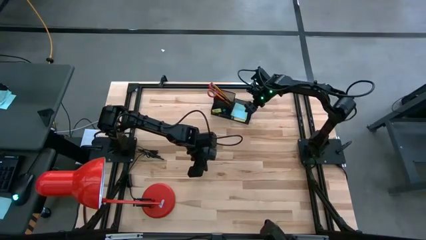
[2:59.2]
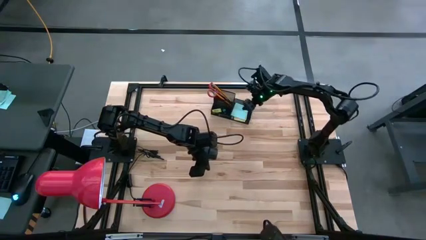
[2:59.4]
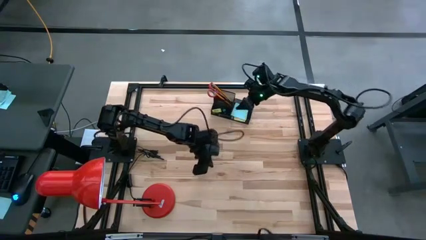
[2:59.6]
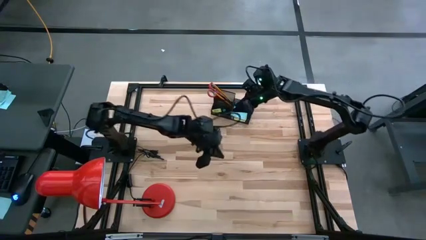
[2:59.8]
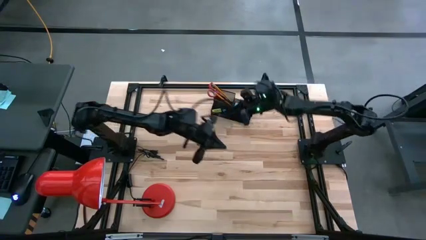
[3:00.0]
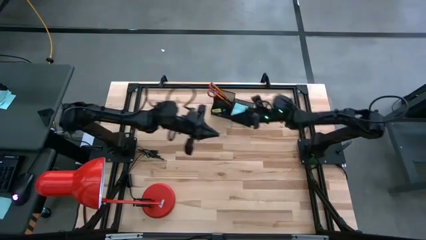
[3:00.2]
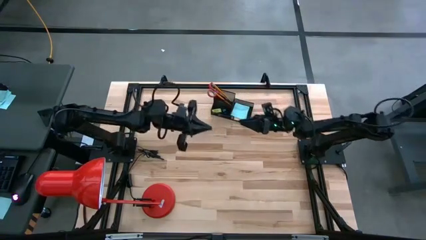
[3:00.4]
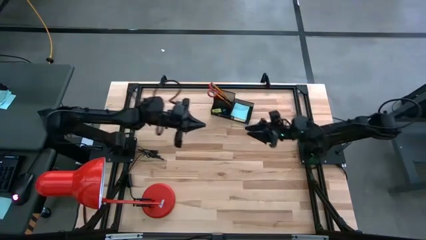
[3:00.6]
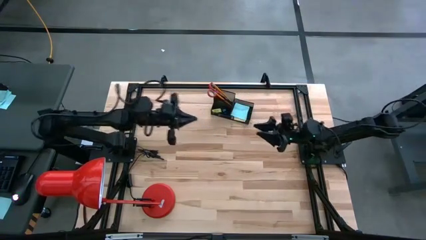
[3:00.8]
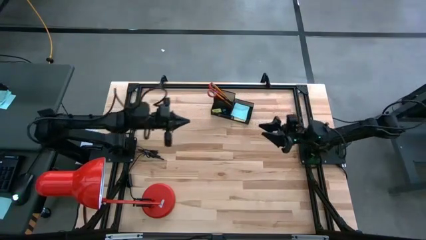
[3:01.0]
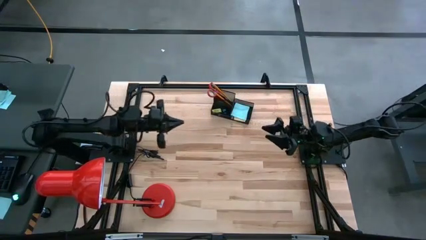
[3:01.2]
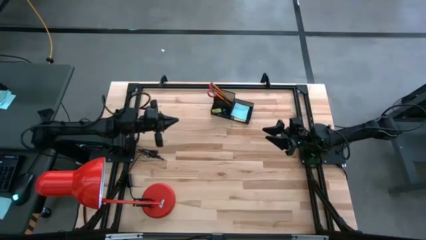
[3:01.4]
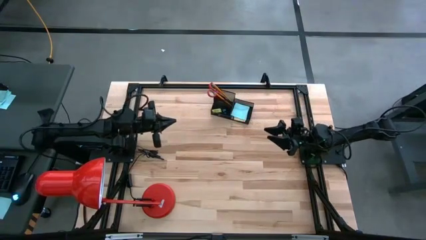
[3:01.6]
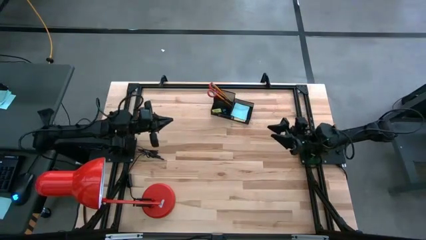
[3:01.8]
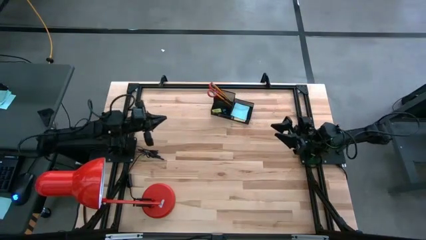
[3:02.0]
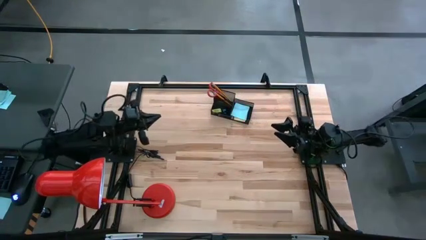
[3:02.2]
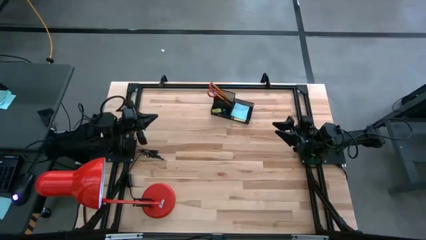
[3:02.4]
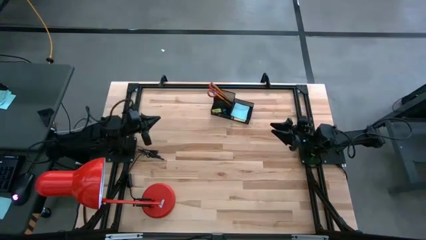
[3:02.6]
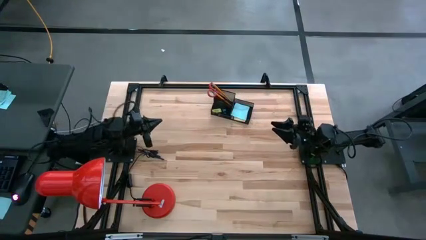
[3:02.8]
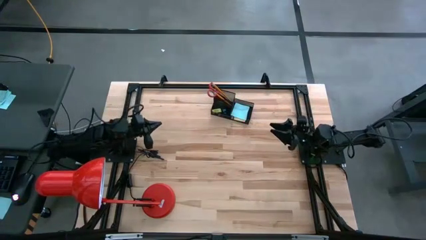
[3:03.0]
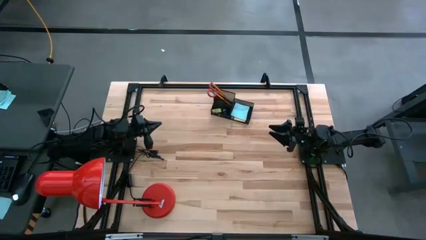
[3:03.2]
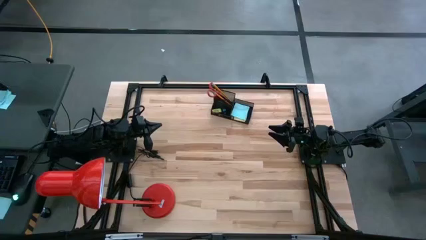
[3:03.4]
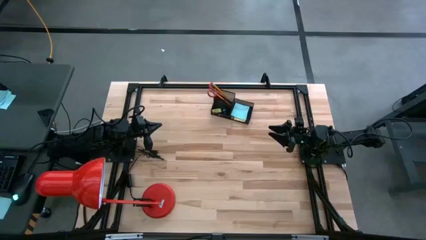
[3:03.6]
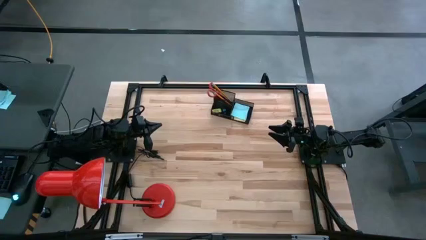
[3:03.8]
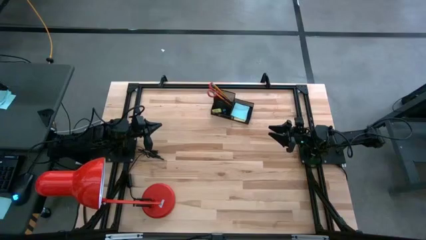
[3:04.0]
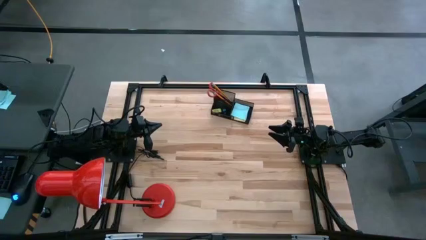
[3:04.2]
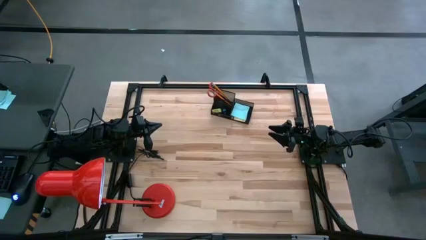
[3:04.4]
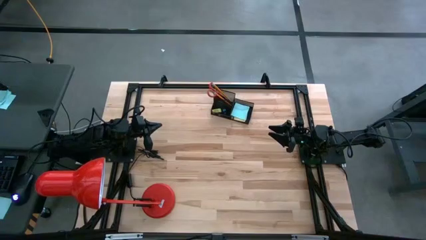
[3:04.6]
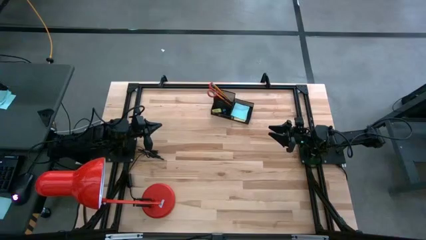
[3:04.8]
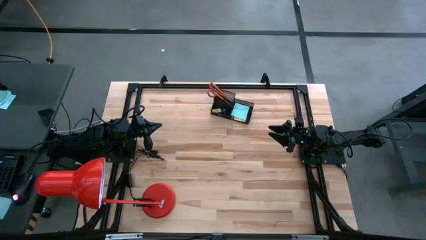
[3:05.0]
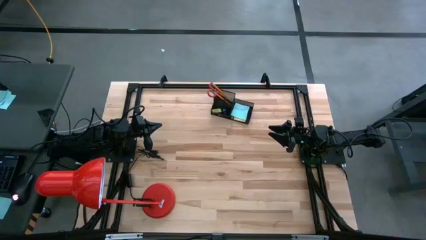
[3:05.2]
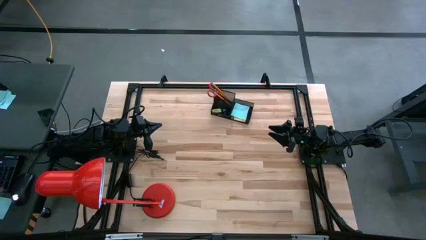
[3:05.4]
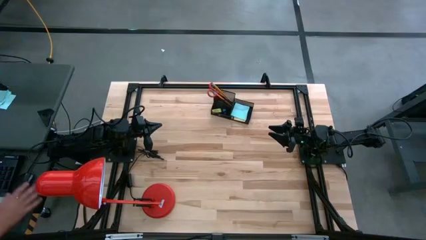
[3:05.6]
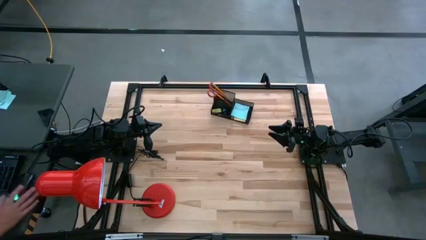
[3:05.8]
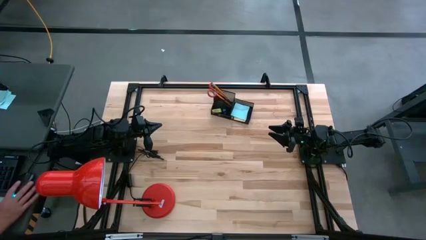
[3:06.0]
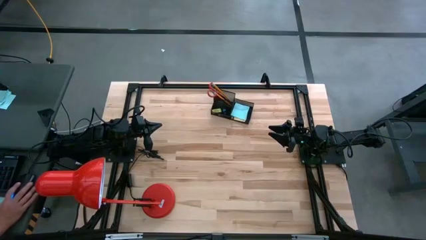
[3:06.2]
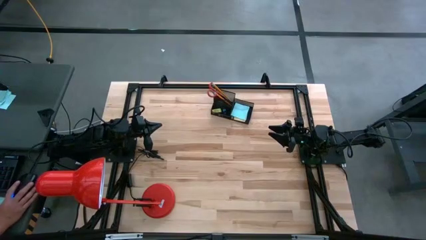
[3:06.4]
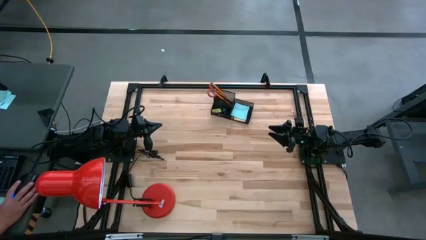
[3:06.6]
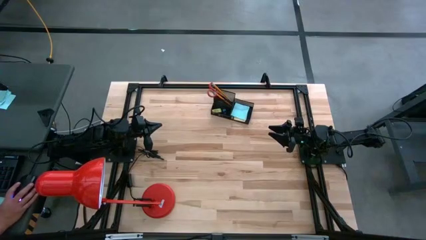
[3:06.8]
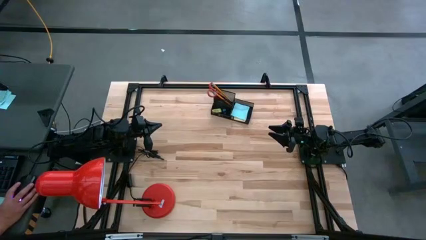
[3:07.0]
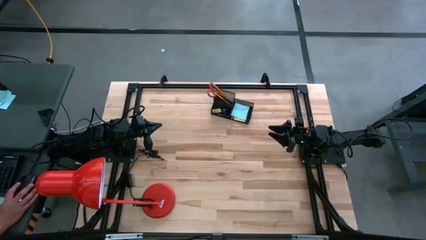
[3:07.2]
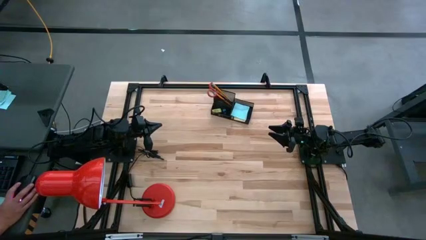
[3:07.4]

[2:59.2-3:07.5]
Task: Pick and place office supplies into organizer
Return to Home Position

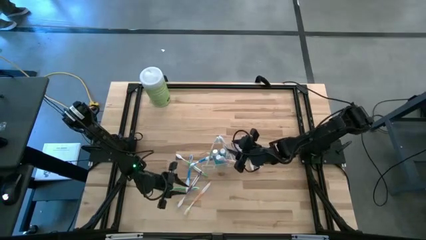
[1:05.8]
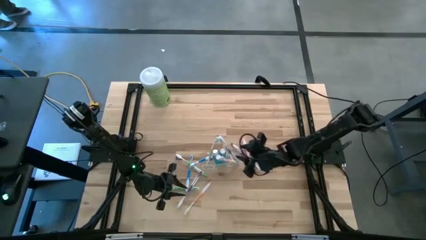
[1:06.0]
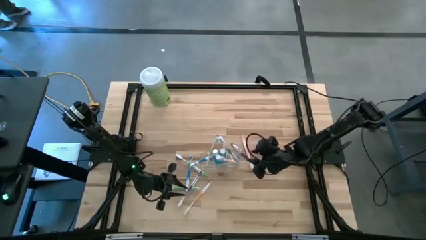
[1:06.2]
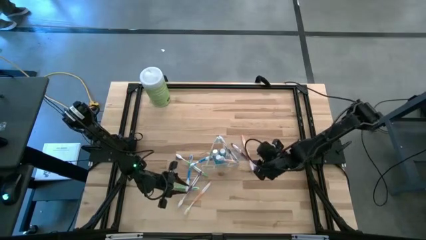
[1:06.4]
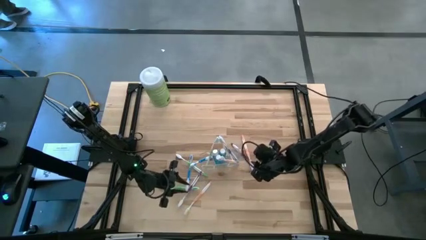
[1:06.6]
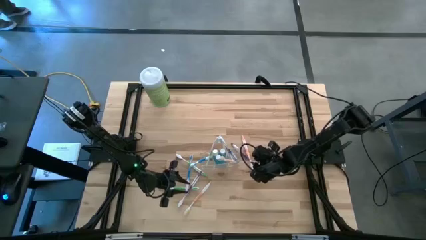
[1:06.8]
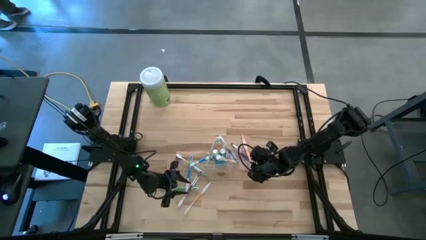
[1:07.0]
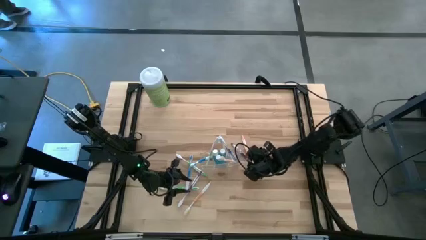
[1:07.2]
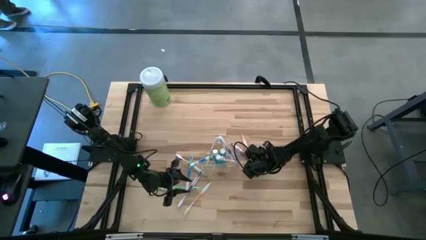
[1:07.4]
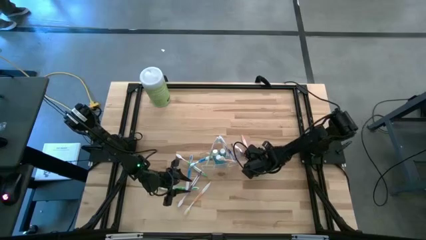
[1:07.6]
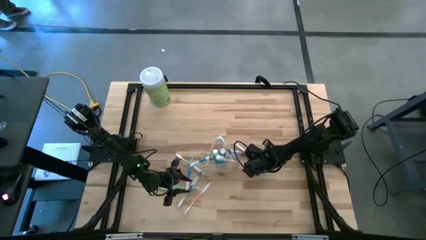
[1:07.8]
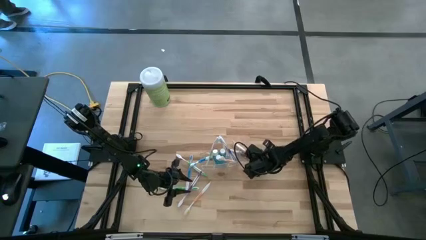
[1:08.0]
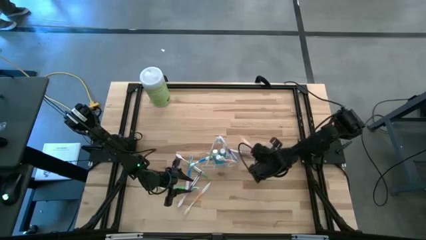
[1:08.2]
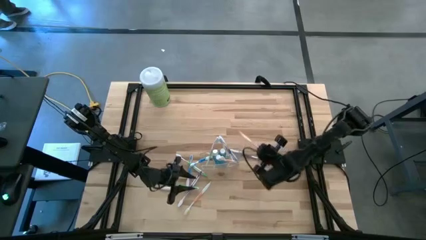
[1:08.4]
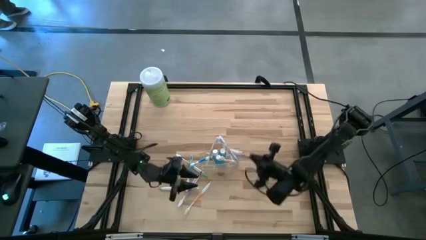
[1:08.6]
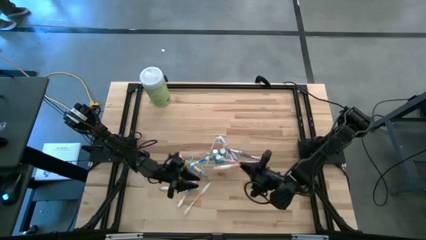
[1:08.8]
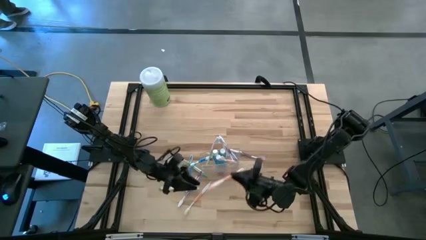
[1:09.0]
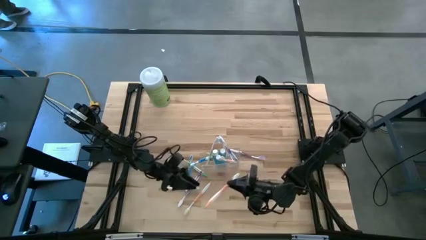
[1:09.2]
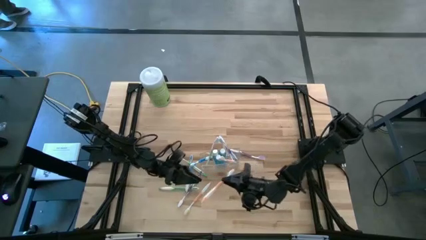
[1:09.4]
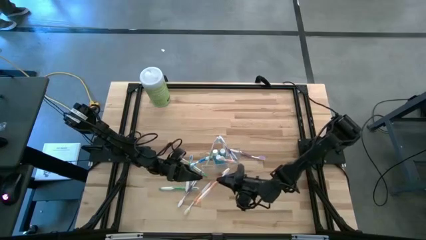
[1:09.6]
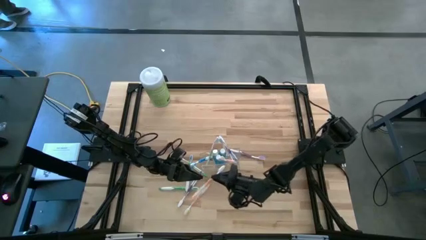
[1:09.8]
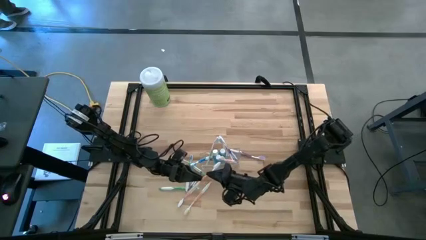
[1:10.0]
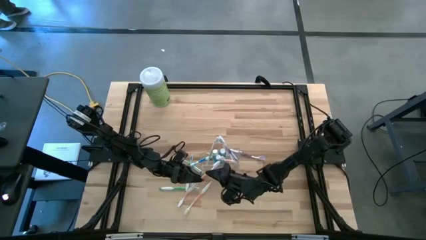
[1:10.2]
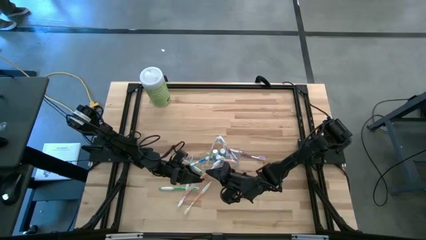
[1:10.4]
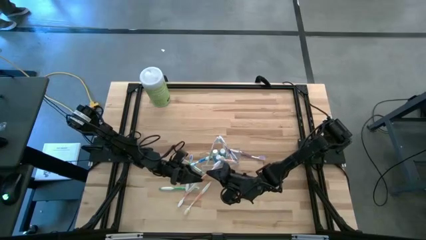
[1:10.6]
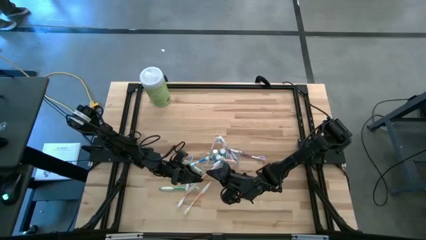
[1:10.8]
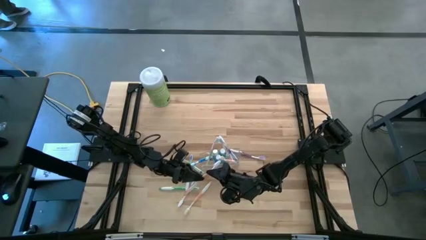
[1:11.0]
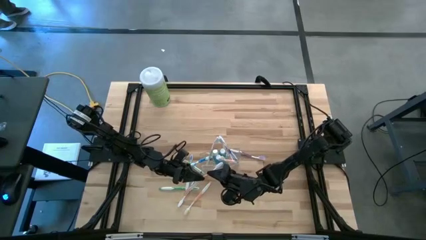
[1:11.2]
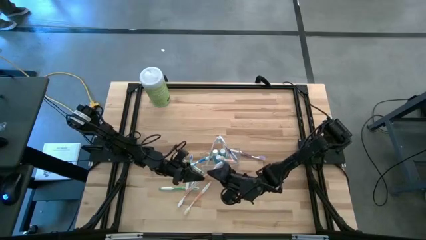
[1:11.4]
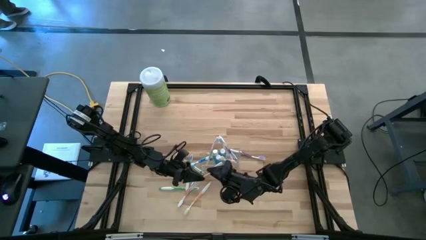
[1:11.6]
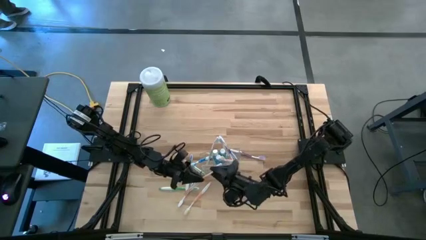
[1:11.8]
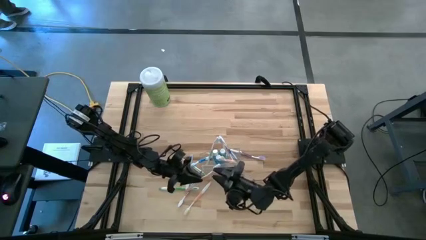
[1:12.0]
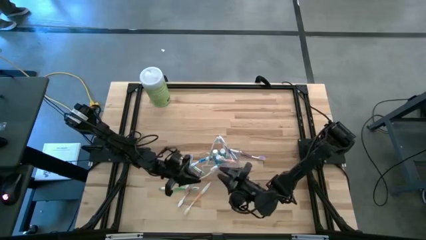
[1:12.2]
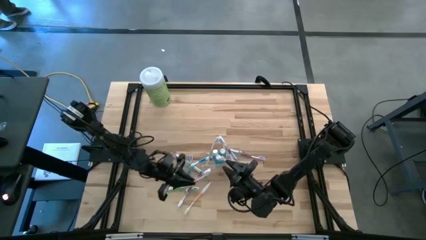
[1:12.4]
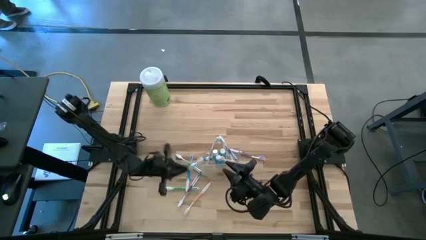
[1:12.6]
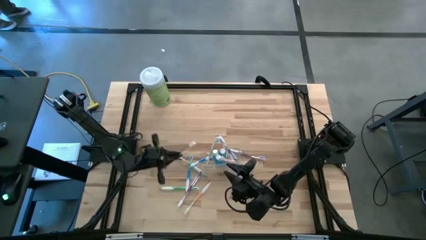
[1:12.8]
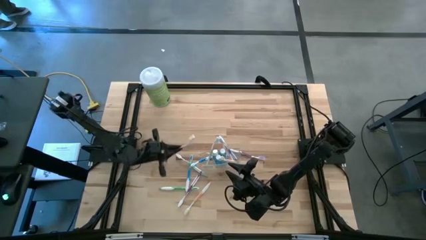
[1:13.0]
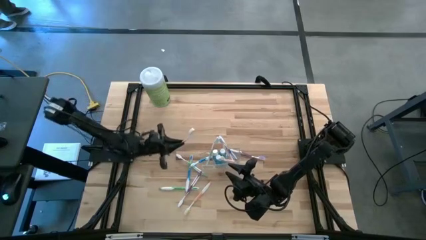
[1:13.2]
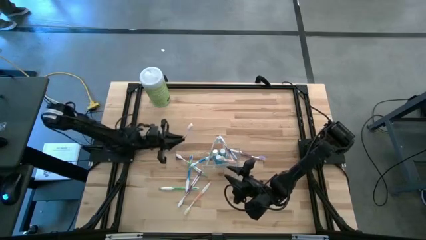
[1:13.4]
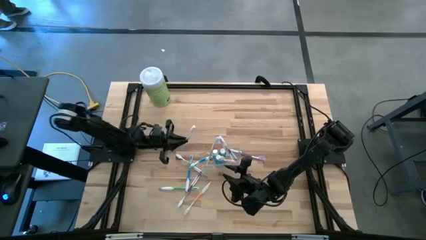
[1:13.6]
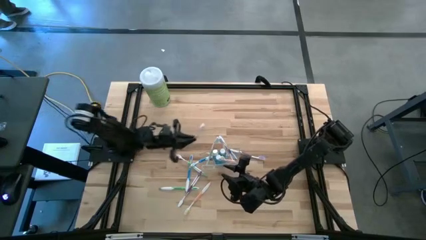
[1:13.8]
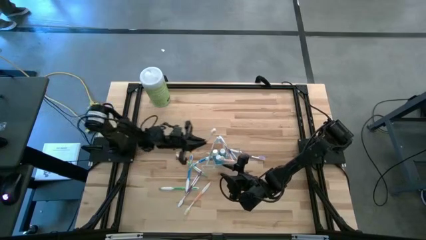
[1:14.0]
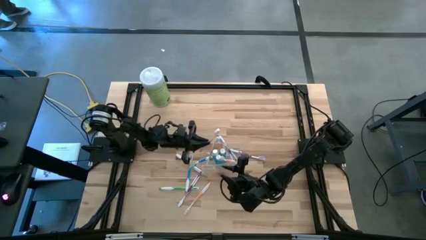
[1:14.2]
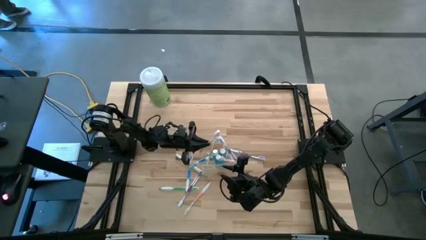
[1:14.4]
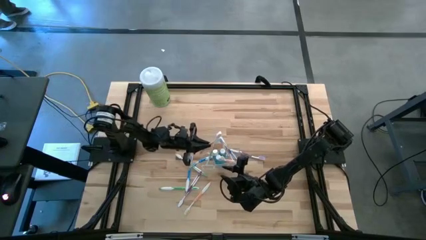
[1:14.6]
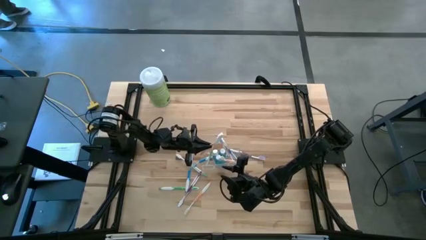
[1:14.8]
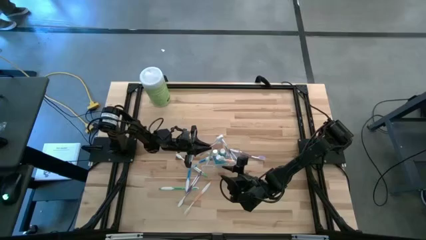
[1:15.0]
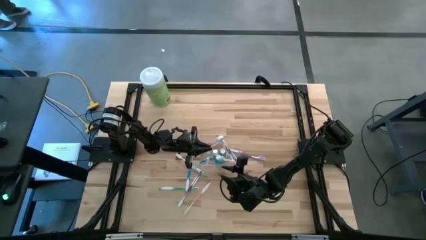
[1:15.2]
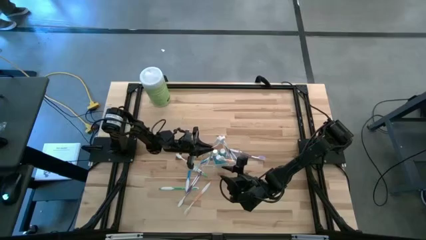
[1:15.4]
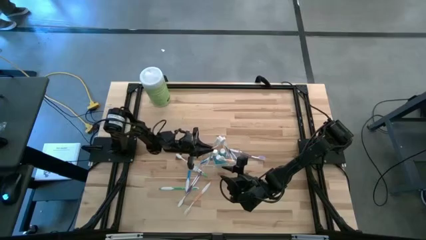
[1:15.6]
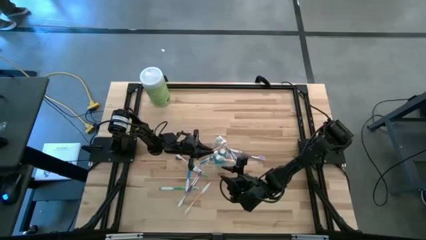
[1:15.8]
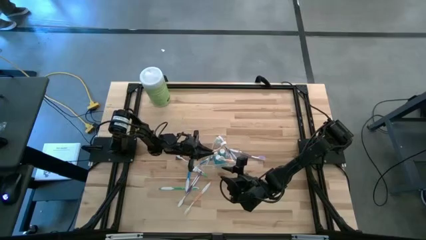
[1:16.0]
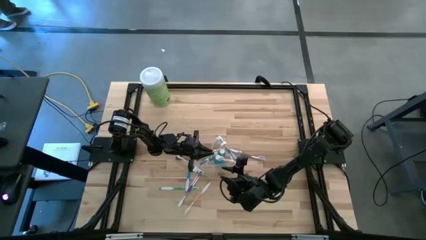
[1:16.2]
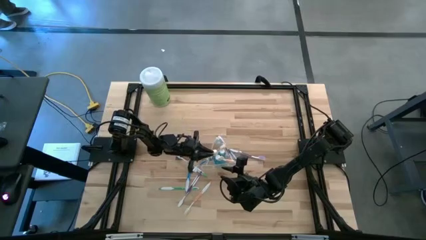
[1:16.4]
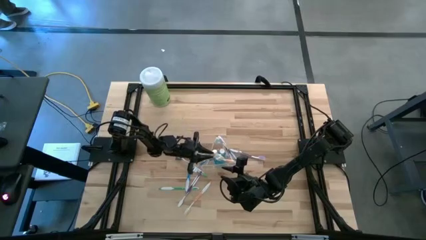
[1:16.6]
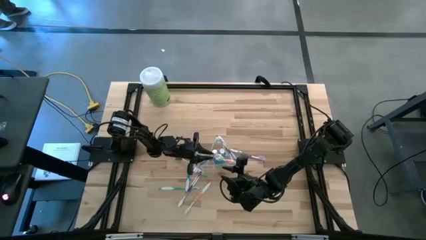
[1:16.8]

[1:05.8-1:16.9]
Task: Pick & Place toothbrushing station
Put the right orange toothbrush into the transparent organizer
